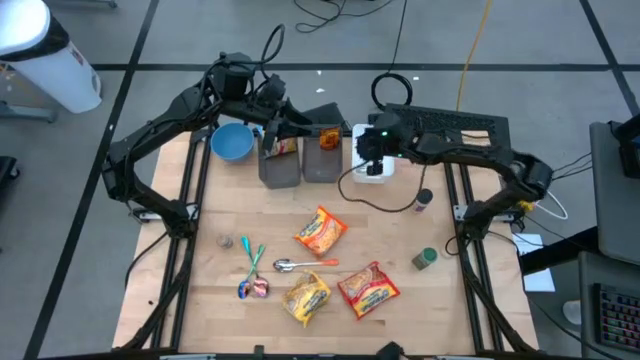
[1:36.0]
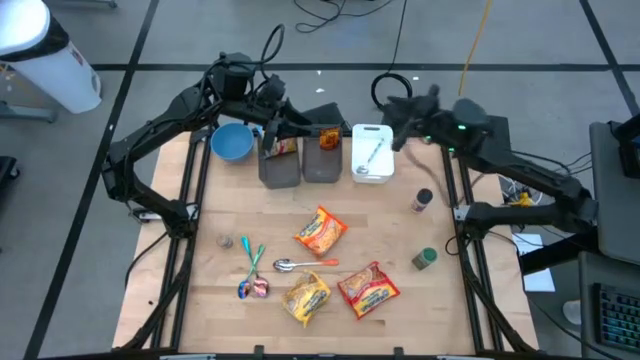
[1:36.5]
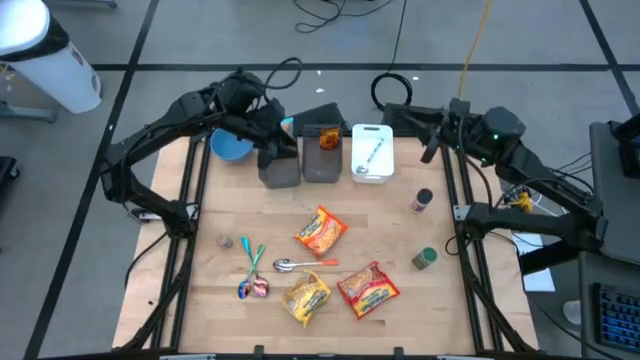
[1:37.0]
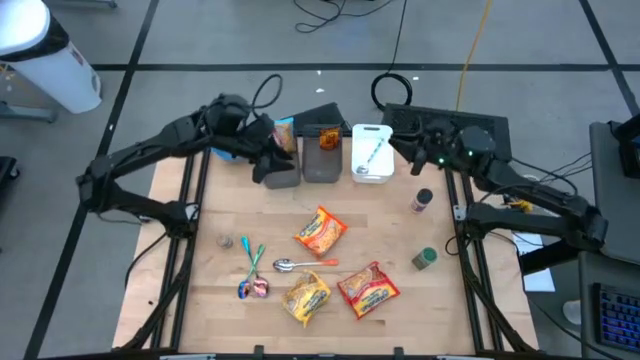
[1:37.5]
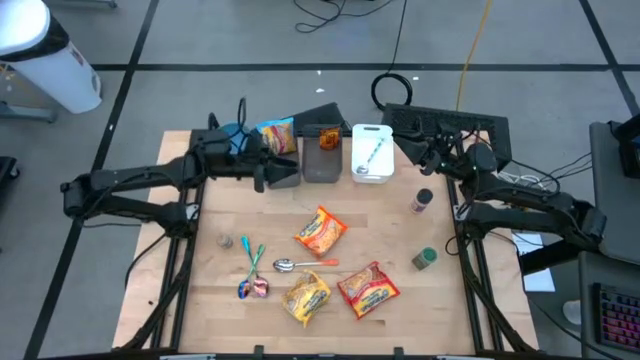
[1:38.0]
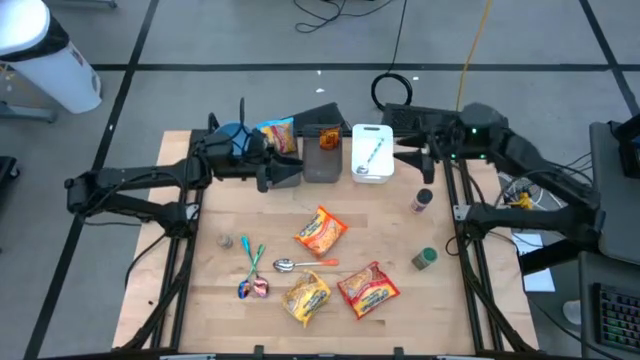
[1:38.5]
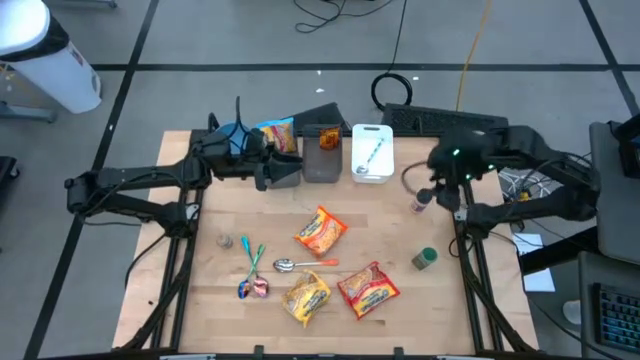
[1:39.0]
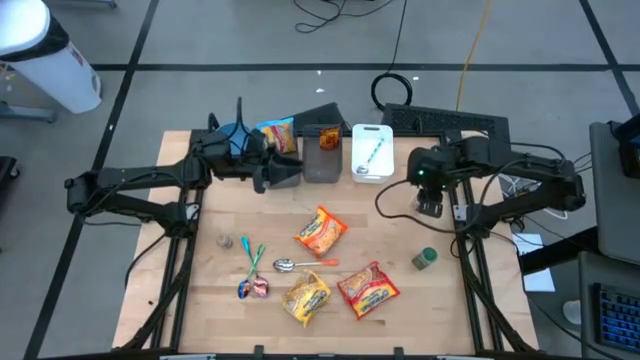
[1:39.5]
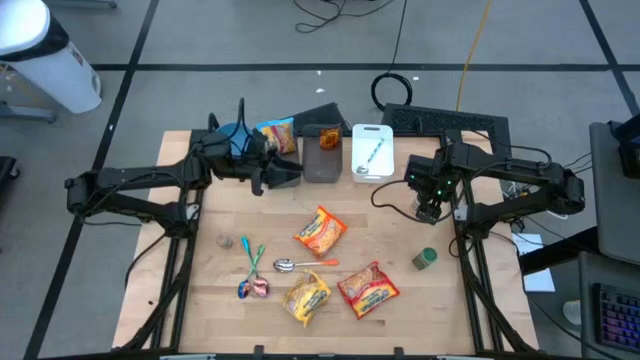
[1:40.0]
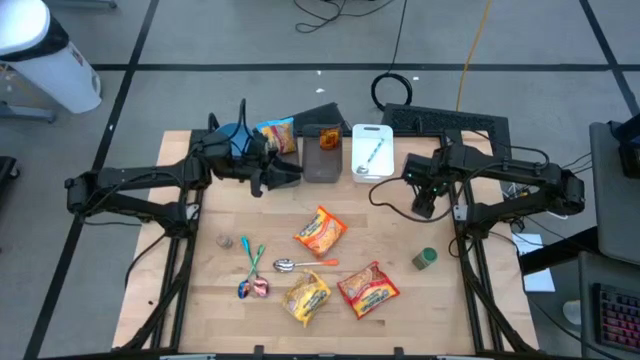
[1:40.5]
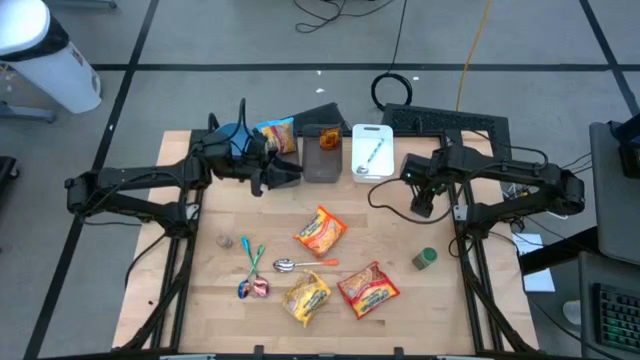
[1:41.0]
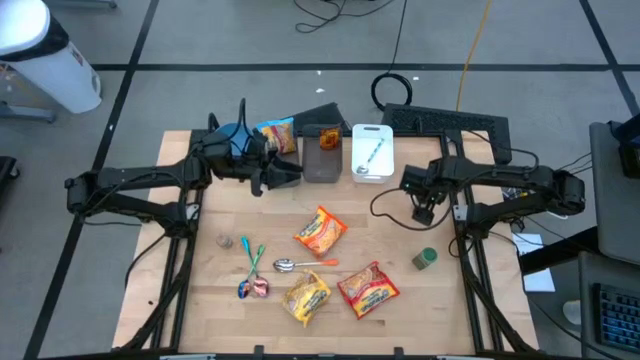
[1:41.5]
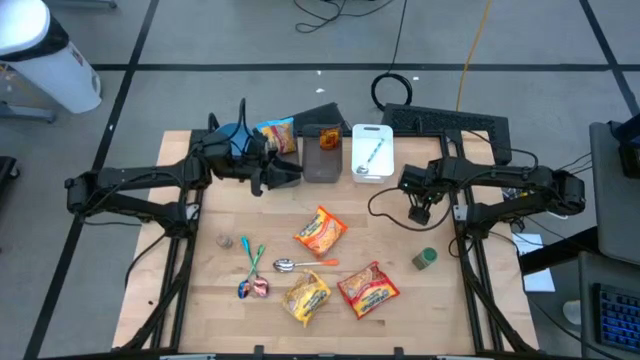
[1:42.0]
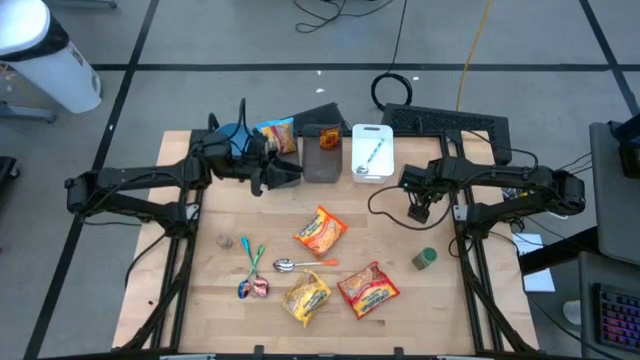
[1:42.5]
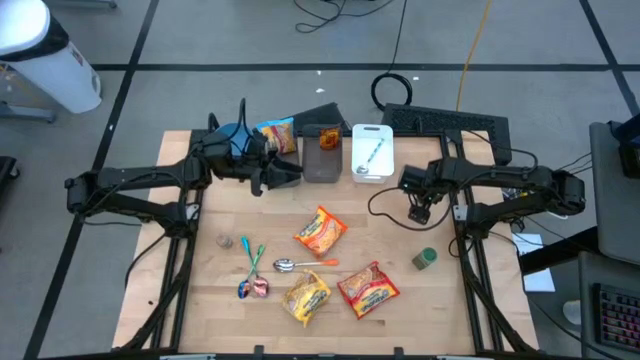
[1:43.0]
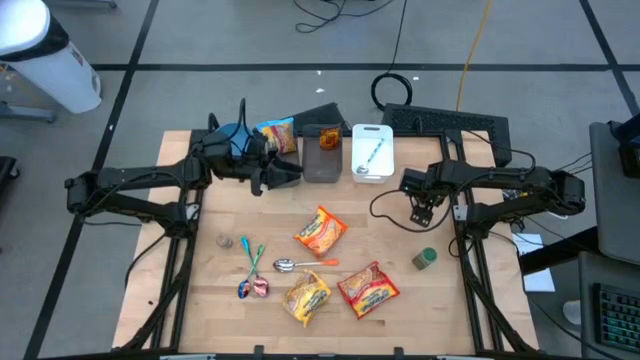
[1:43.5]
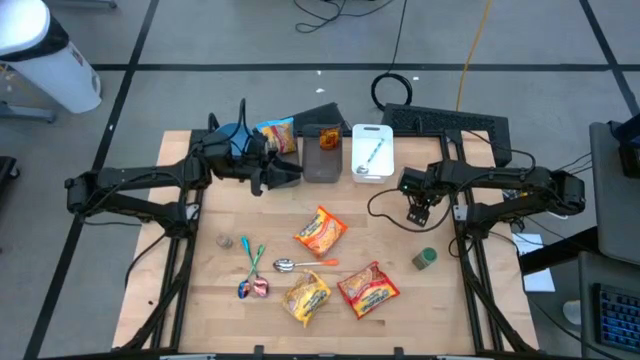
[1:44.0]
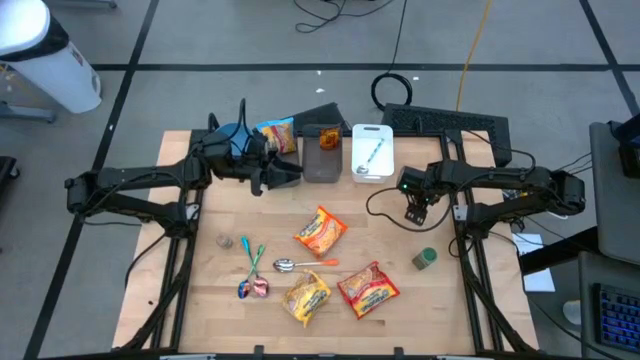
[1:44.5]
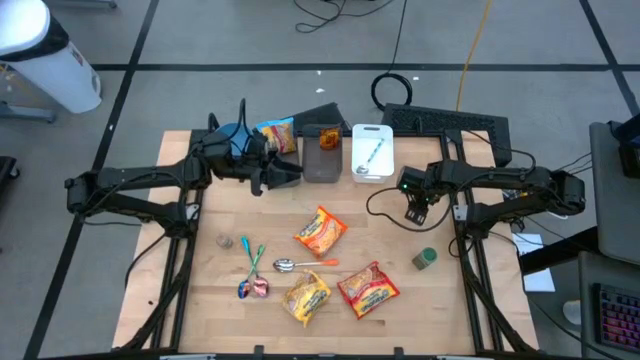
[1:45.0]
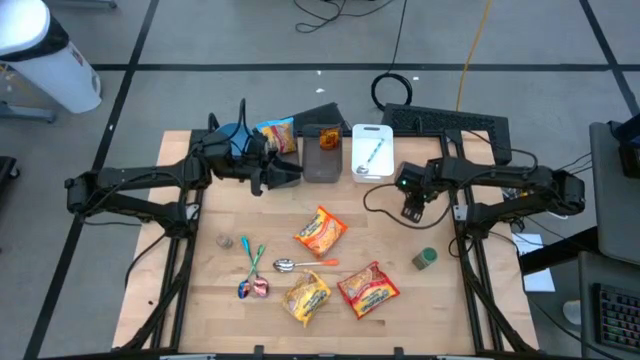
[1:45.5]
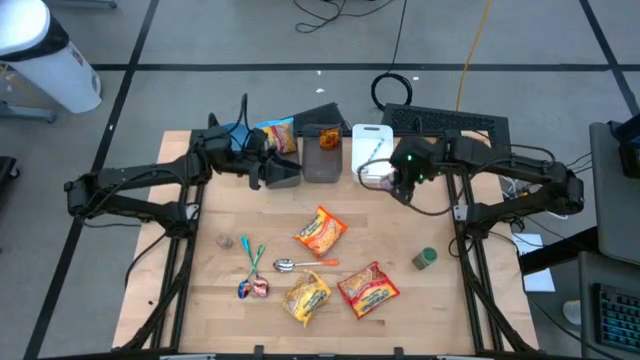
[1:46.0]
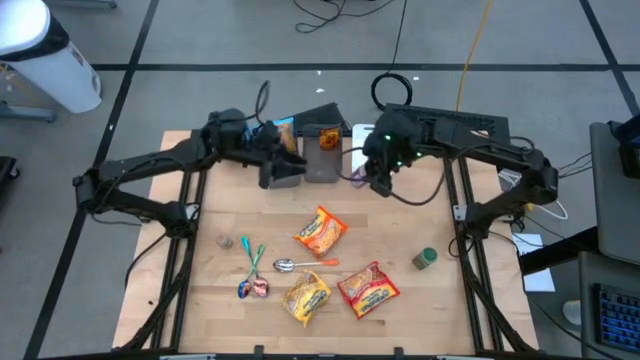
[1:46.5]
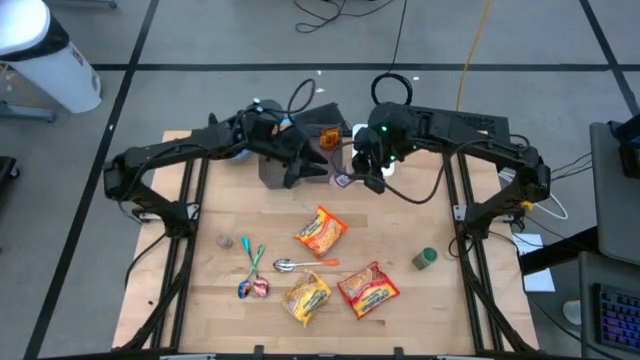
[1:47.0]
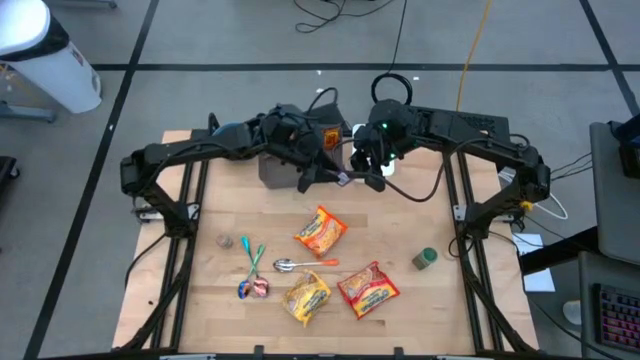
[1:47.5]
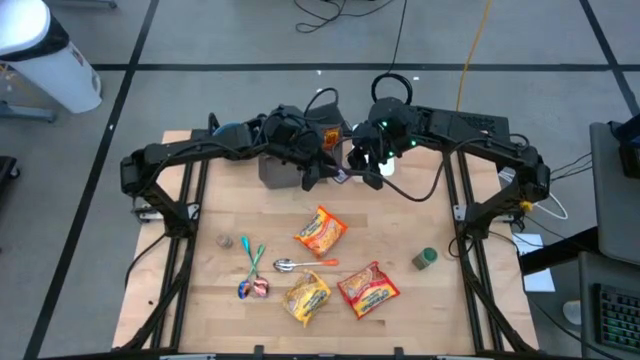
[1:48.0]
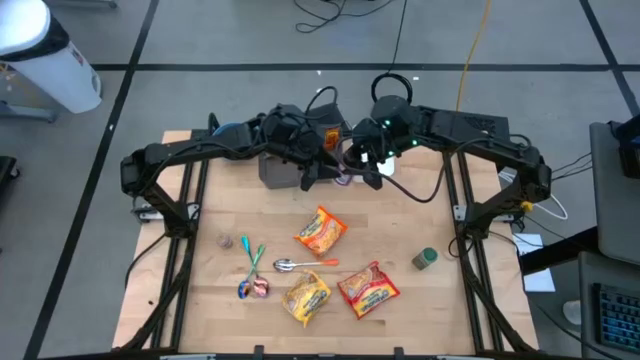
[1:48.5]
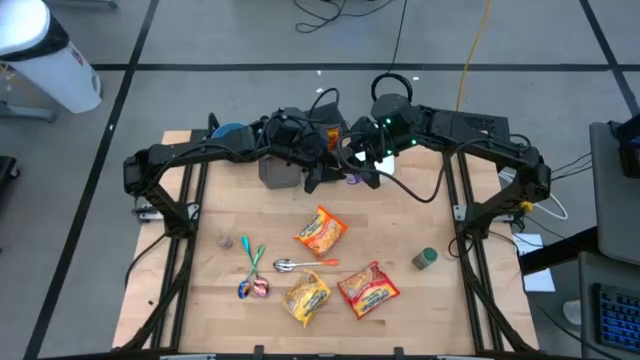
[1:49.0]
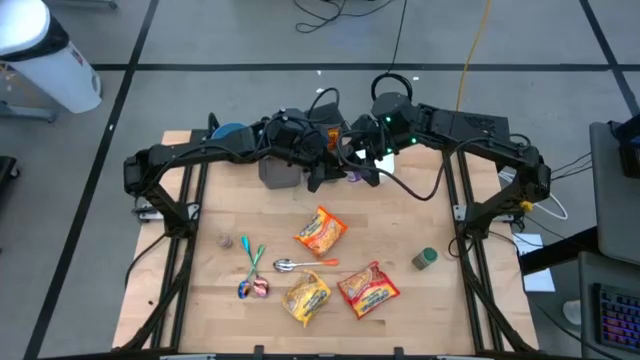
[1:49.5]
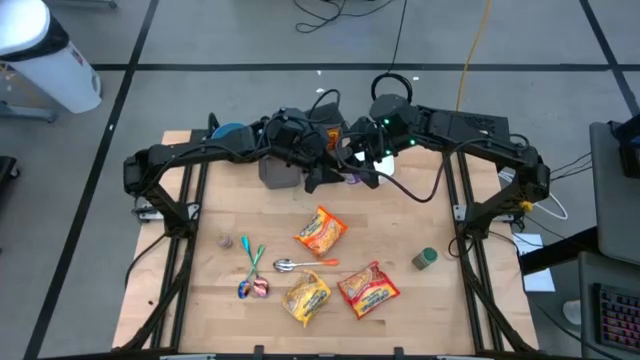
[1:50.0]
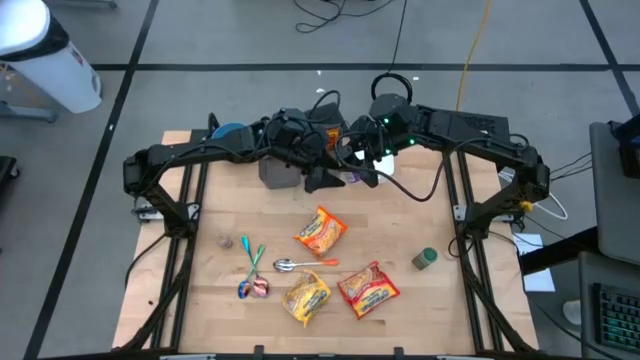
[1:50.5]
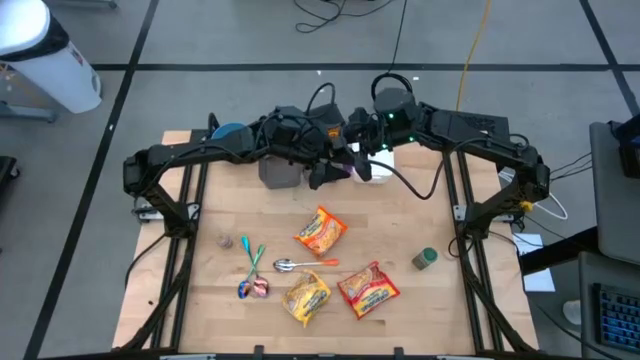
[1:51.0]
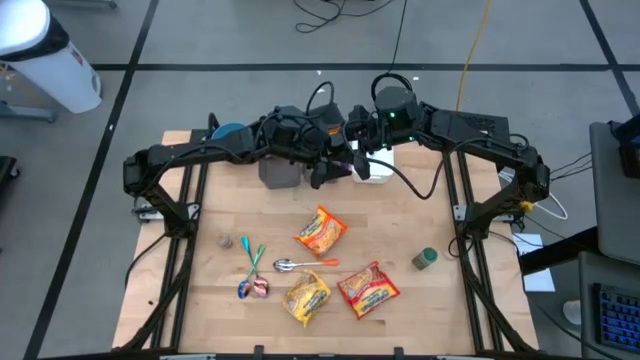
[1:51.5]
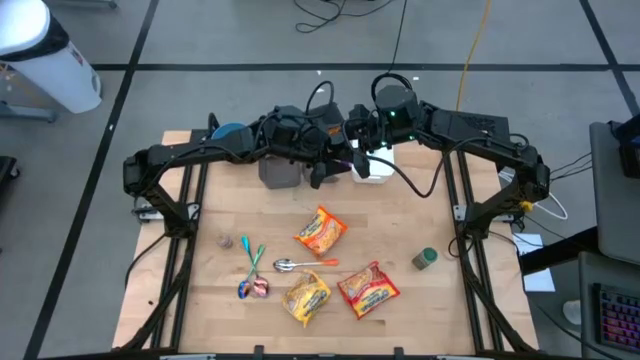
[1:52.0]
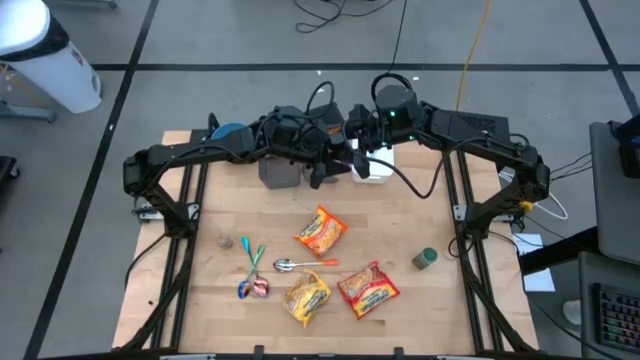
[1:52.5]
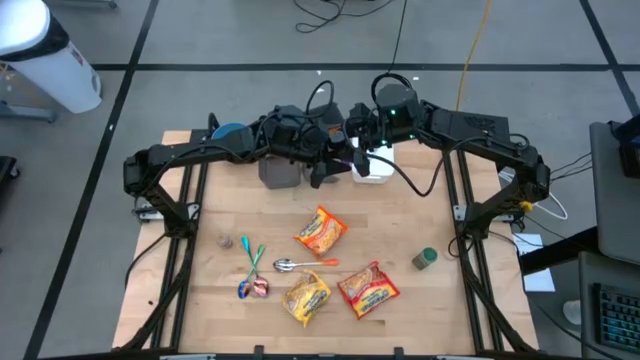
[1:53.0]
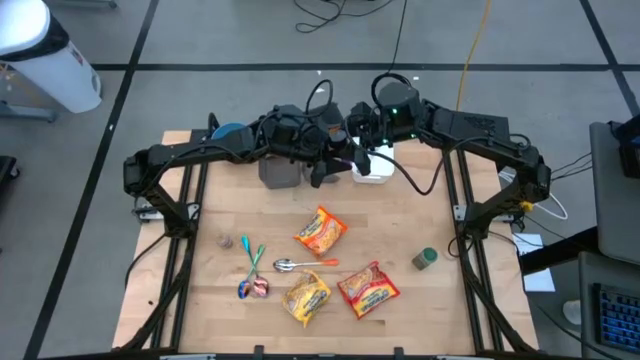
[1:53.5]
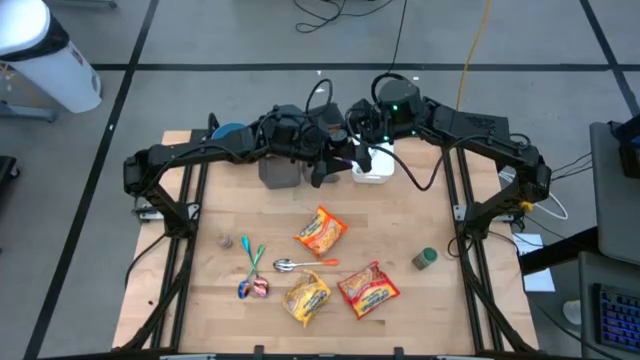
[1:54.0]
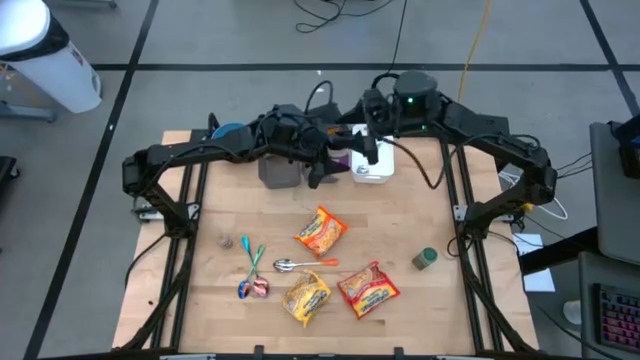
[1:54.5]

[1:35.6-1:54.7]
Task: Pick & Place Food Item
Put the violet seasoning bottle into the right black bin

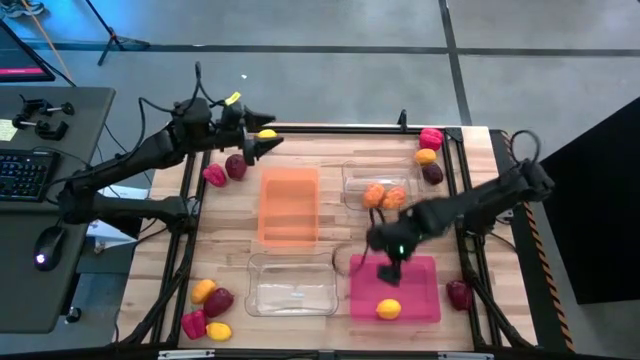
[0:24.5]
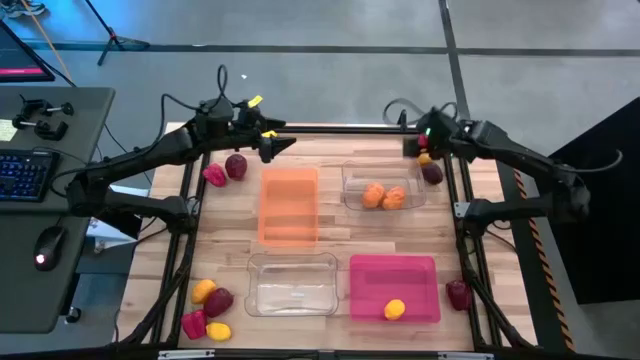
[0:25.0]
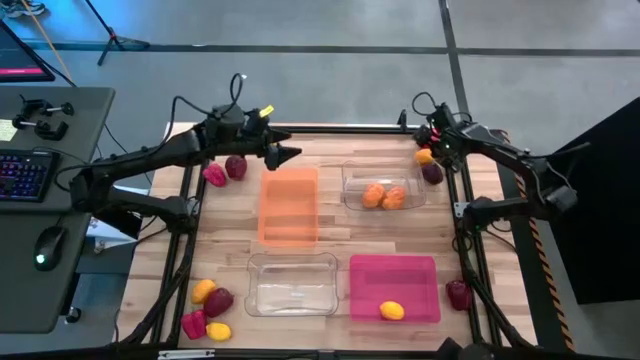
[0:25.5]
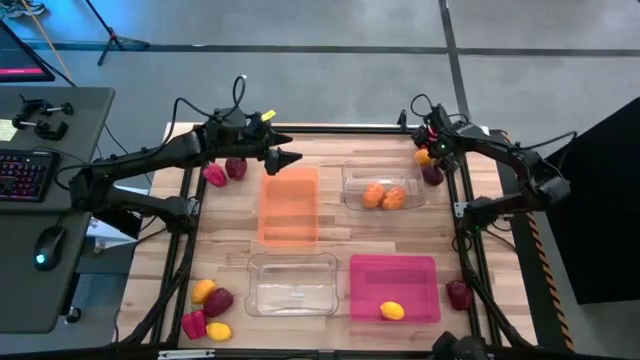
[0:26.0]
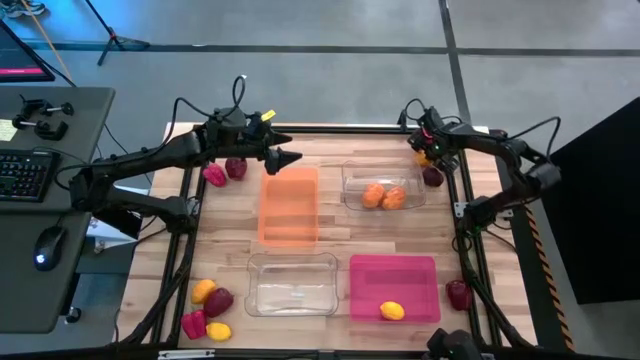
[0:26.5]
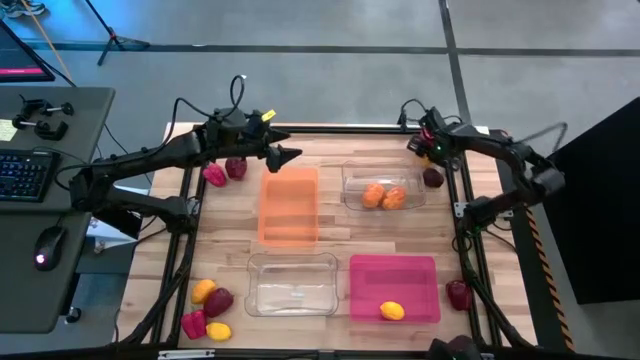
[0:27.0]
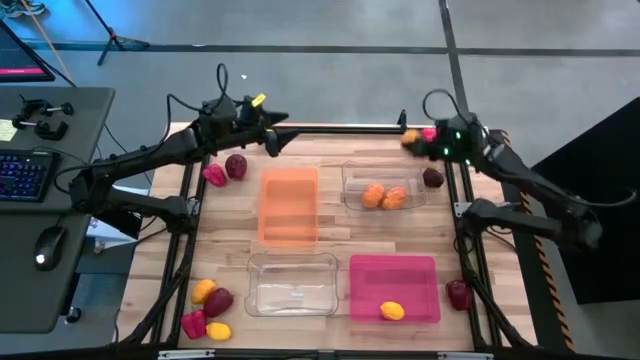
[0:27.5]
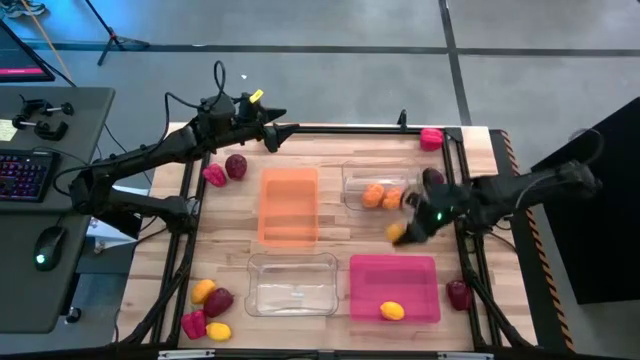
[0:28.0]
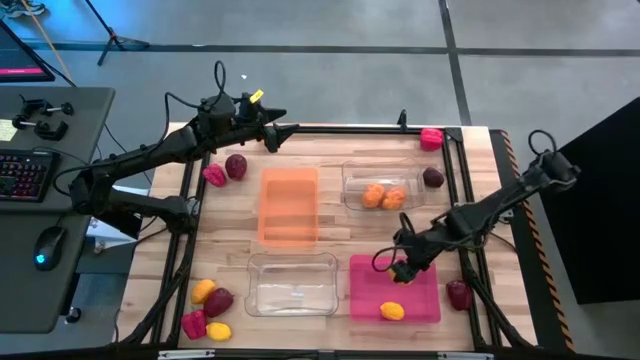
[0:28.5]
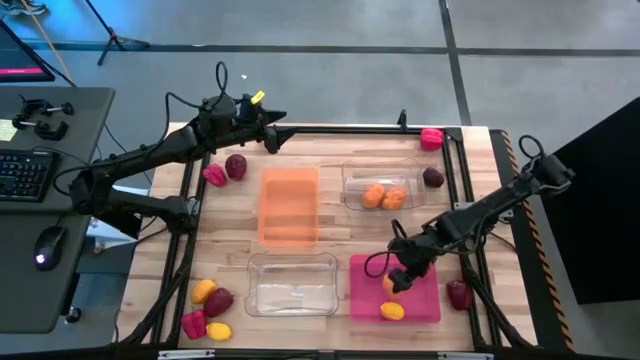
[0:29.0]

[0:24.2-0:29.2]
Task: Sort produce into baskets
Put the top right lemon into the pink bin
